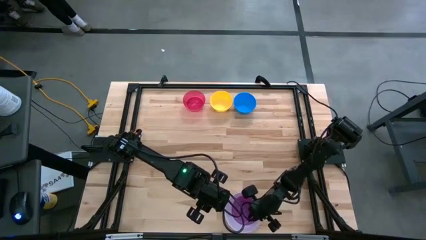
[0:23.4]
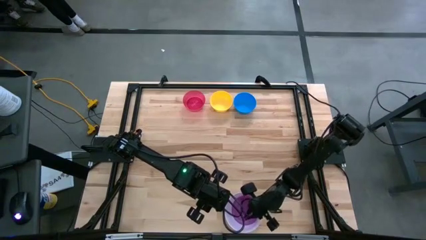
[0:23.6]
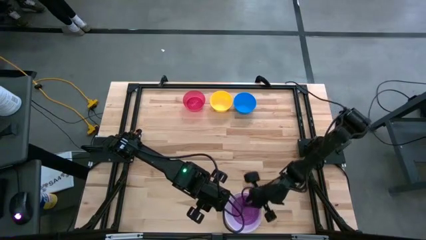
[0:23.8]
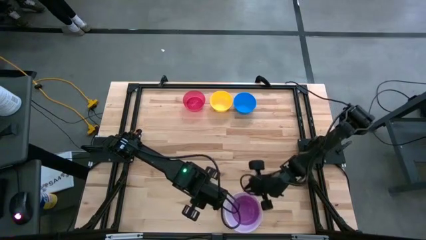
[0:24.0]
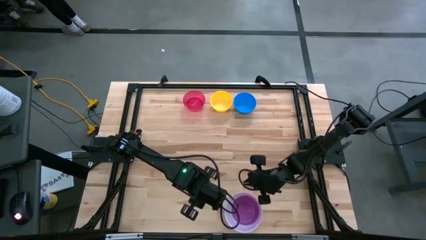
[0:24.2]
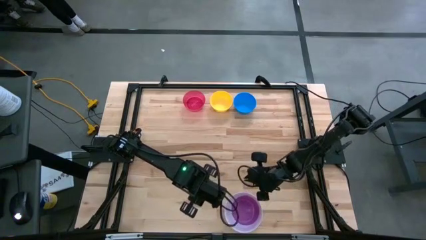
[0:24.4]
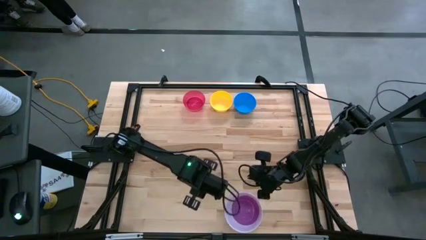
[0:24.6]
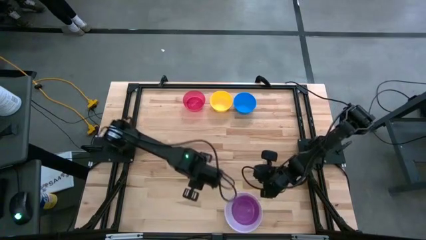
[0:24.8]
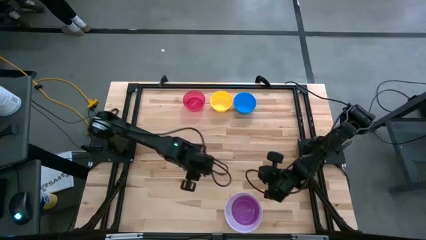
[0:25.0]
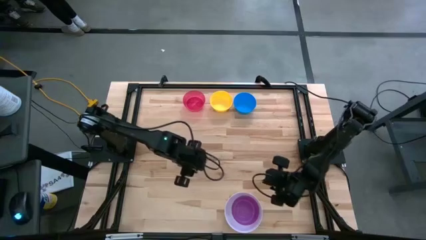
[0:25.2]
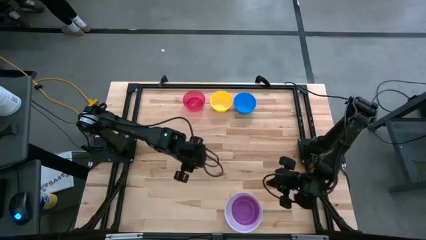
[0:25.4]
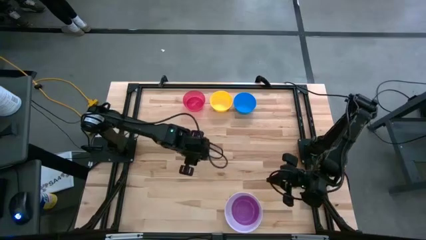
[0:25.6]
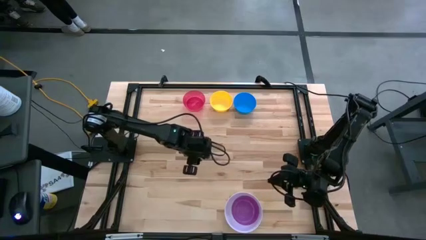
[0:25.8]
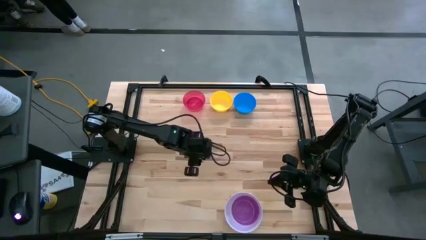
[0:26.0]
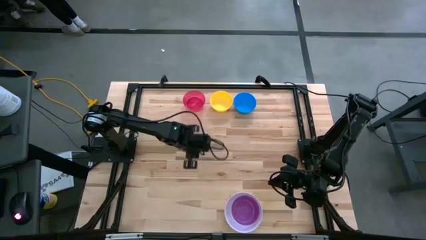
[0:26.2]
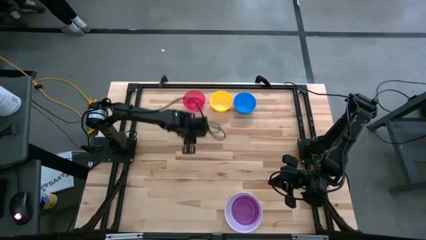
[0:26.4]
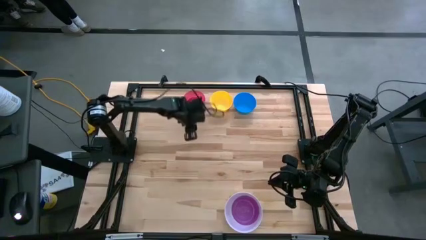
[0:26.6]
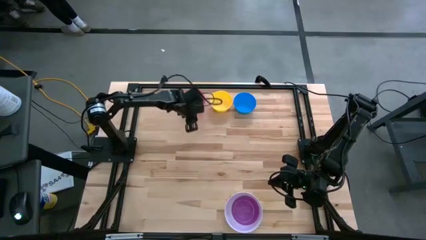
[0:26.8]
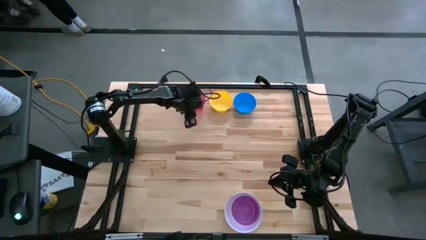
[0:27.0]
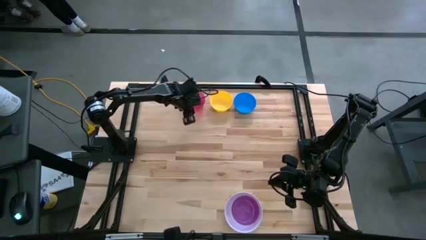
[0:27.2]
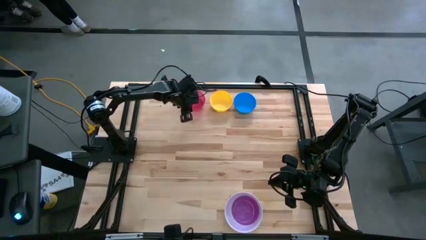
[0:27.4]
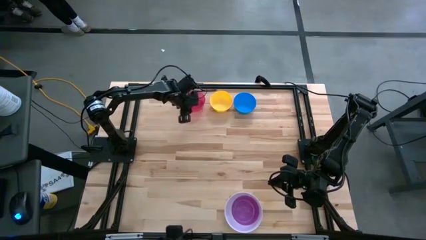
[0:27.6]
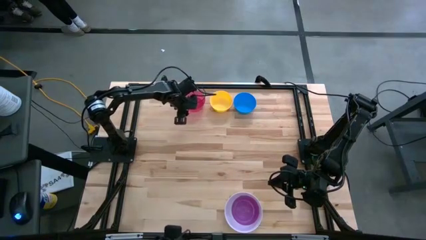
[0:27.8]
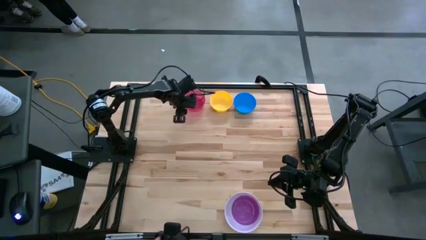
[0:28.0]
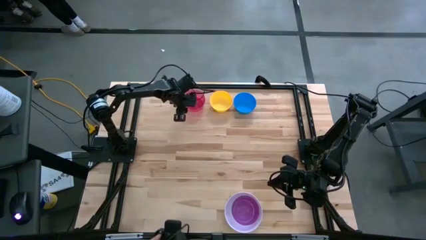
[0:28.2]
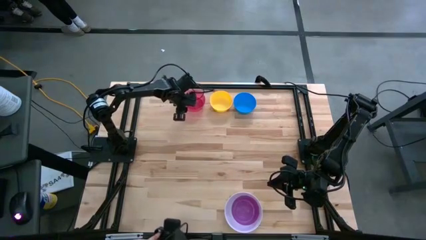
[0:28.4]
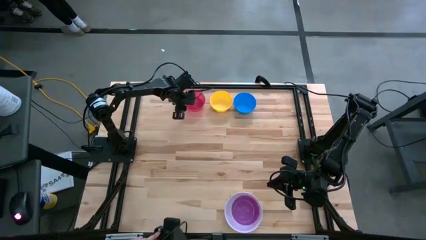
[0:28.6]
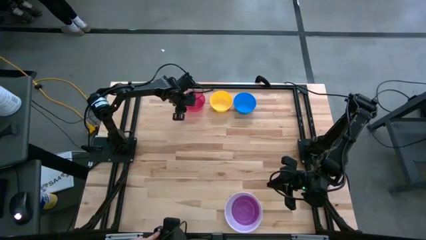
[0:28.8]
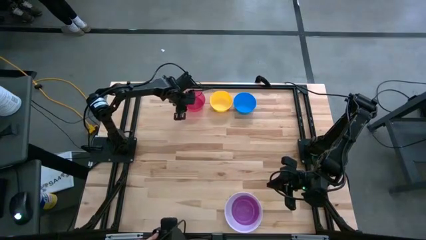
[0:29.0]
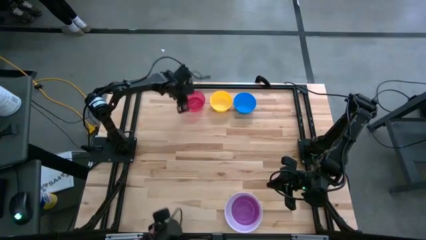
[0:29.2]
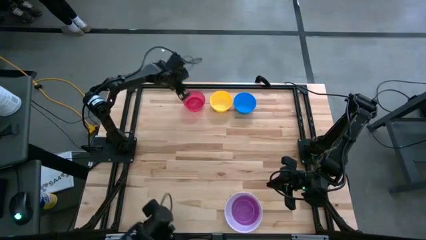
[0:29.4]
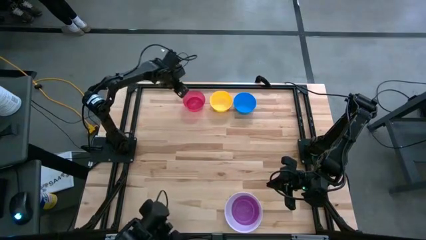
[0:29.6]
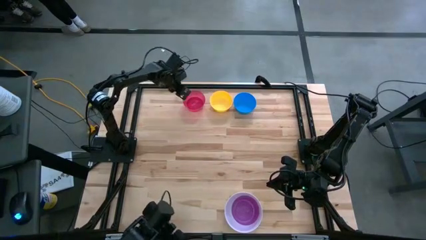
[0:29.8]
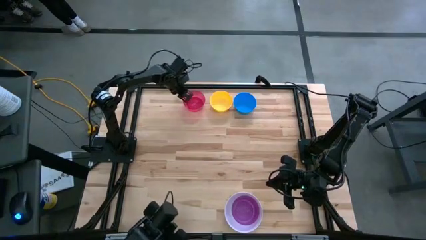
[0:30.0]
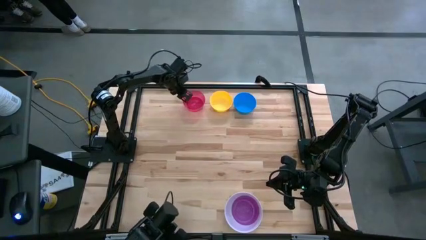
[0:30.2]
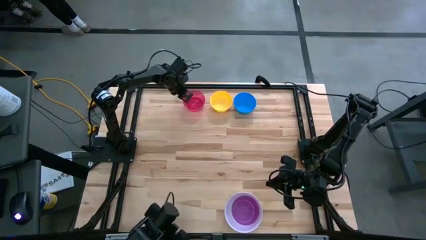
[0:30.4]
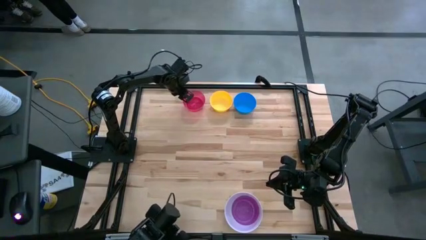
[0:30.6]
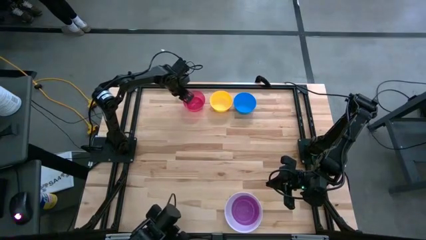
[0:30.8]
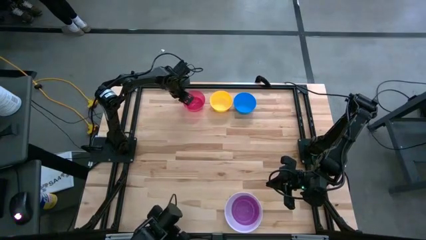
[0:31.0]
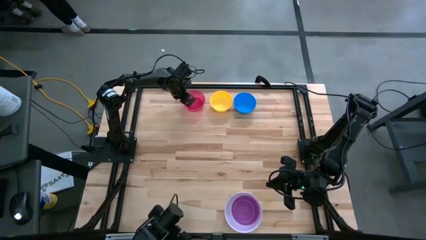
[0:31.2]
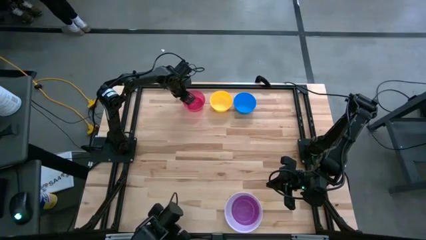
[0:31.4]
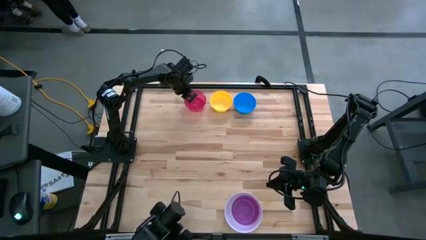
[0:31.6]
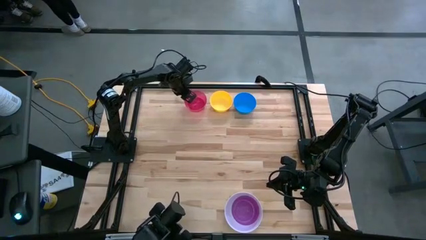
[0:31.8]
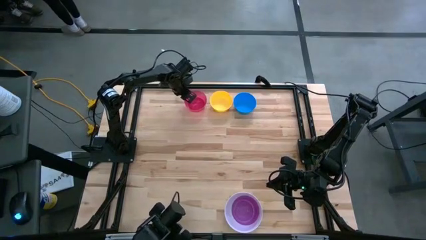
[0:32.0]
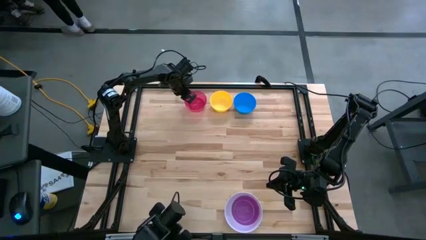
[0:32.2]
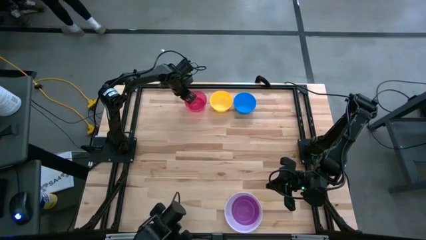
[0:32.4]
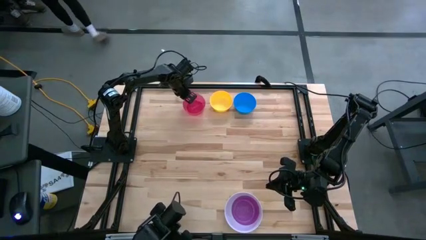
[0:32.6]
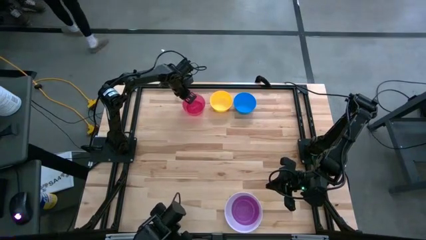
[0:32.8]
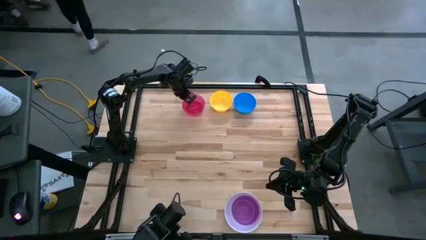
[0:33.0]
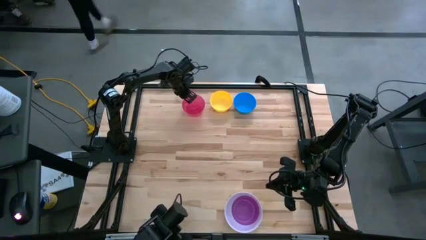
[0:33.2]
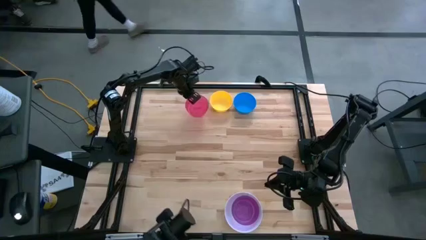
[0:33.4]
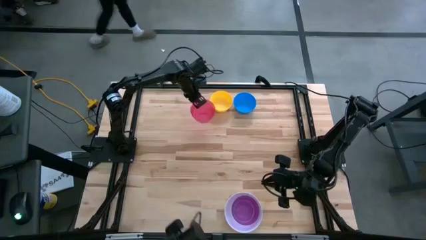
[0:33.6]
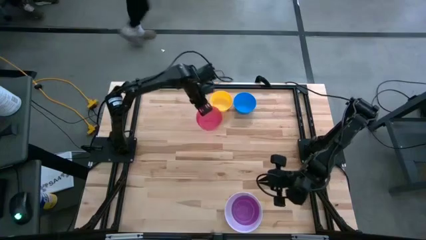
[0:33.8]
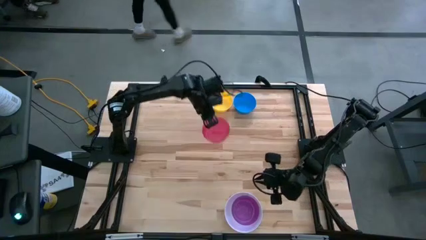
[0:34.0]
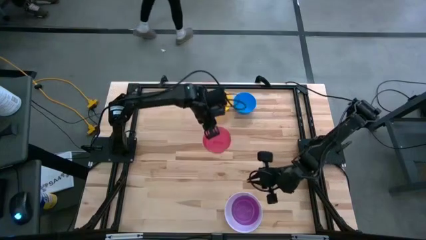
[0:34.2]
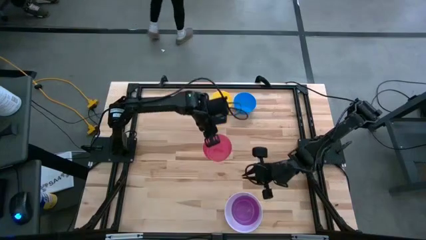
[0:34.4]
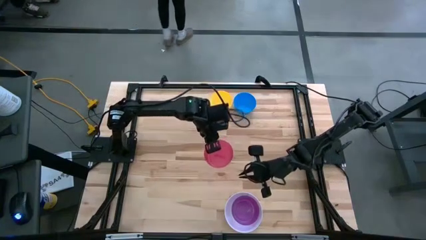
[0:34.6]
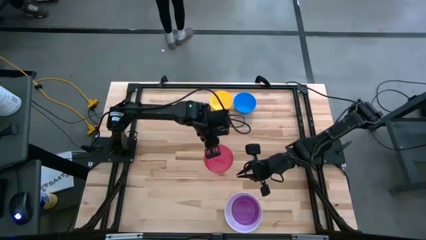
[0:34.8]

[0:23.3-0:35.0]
Stack the red bowl on the violet bowl
